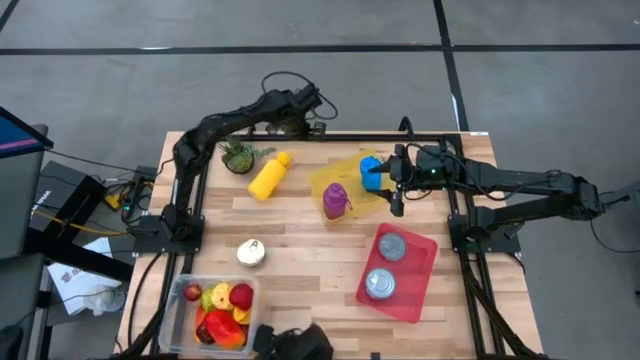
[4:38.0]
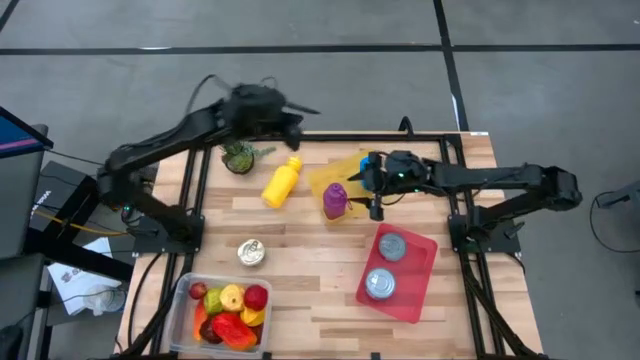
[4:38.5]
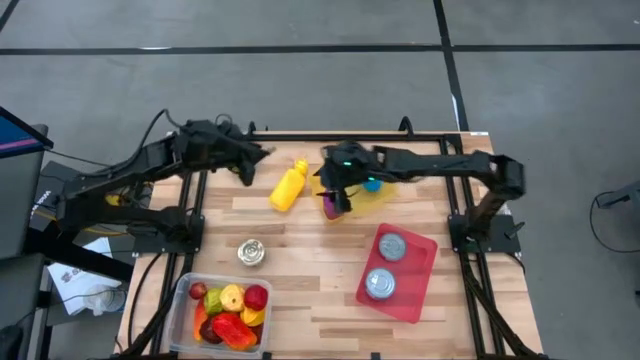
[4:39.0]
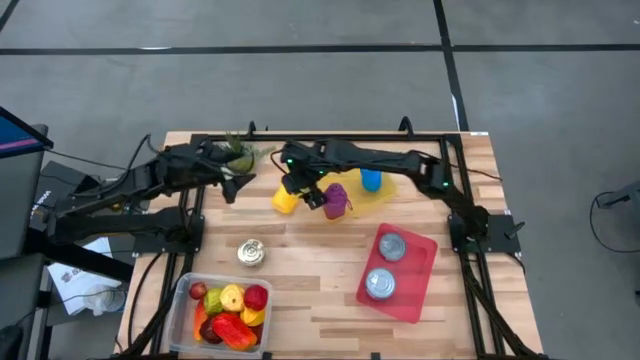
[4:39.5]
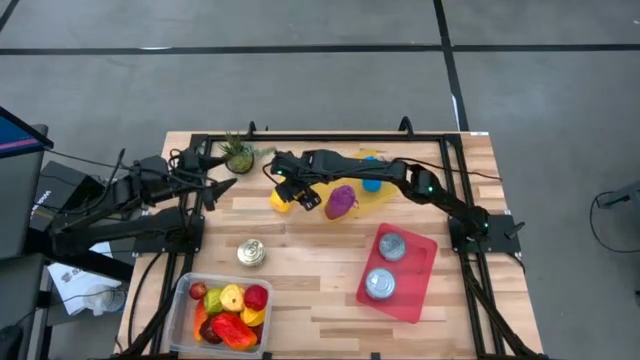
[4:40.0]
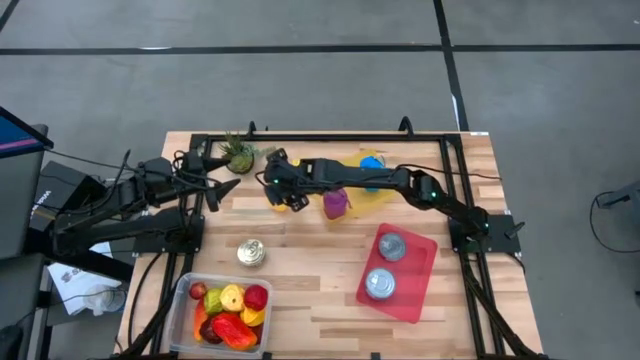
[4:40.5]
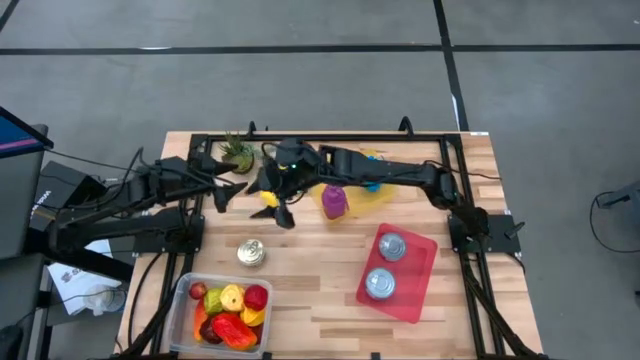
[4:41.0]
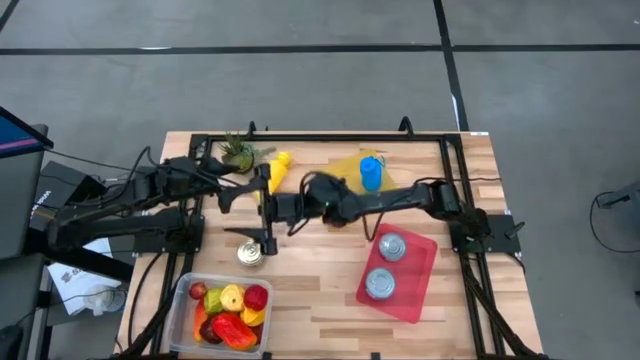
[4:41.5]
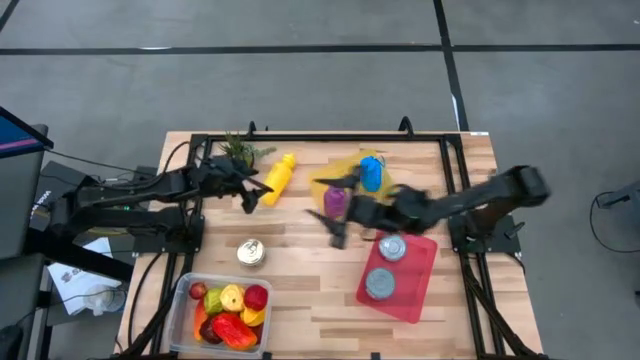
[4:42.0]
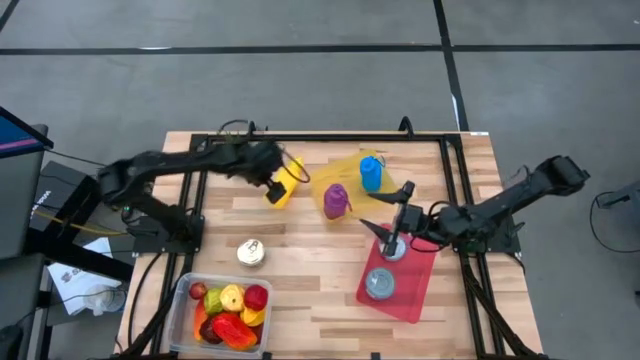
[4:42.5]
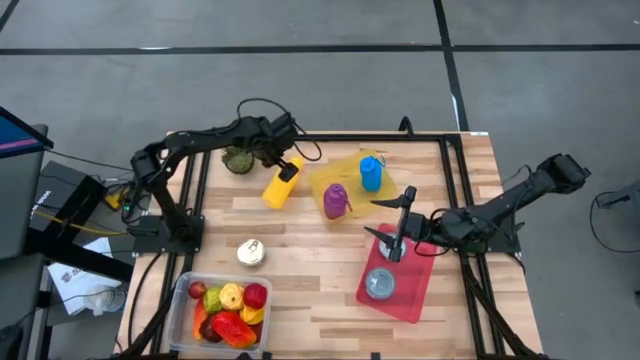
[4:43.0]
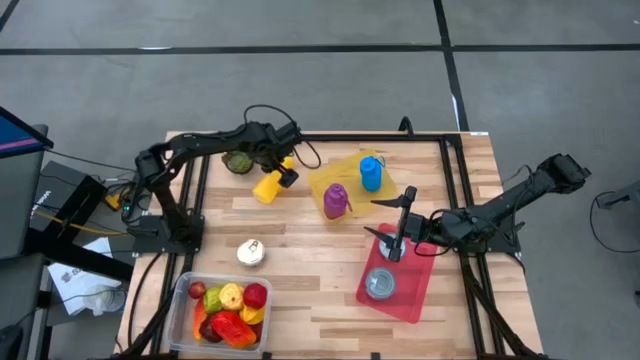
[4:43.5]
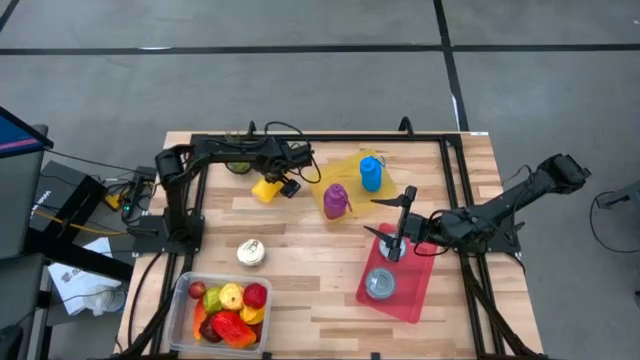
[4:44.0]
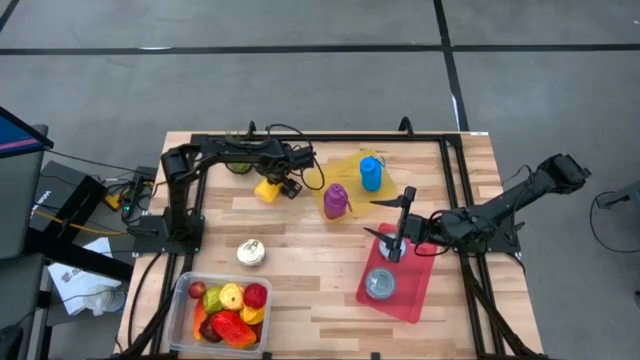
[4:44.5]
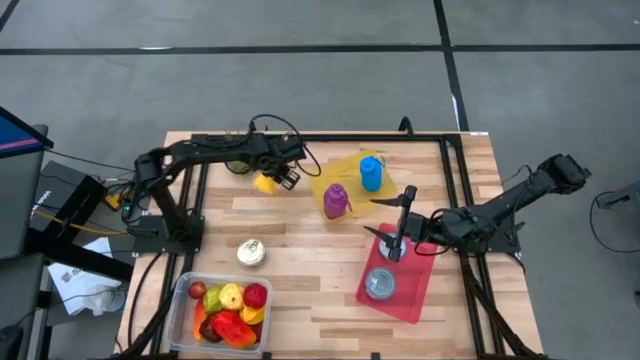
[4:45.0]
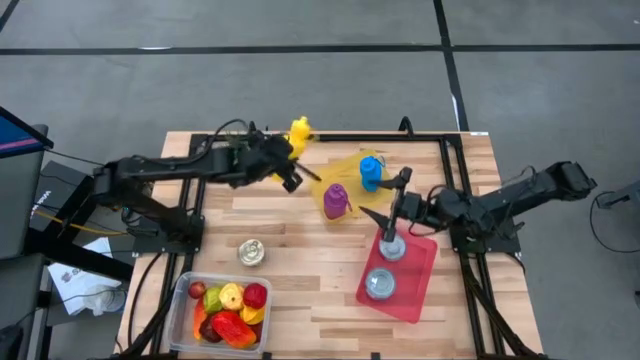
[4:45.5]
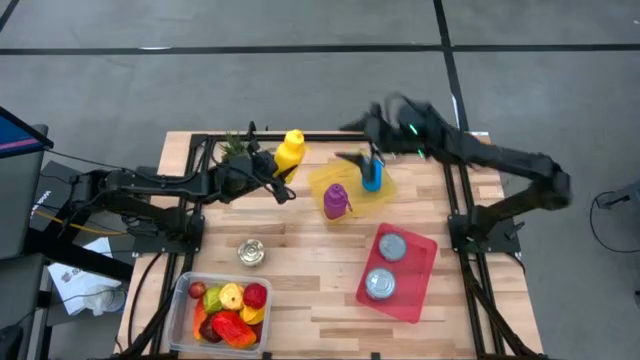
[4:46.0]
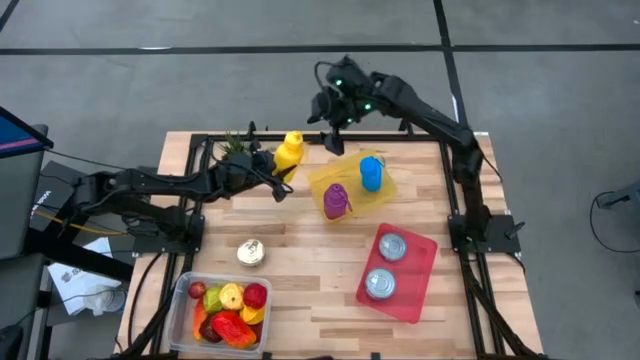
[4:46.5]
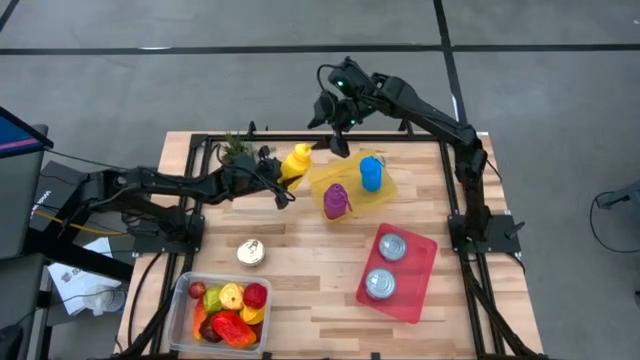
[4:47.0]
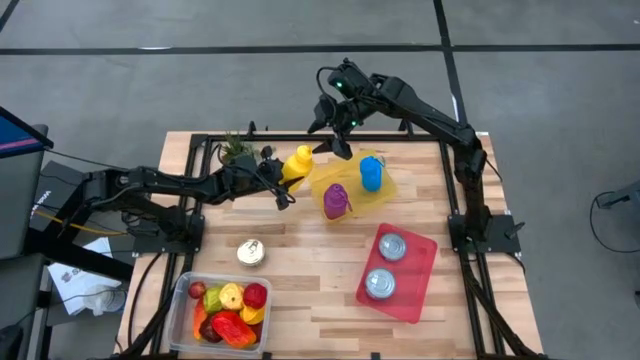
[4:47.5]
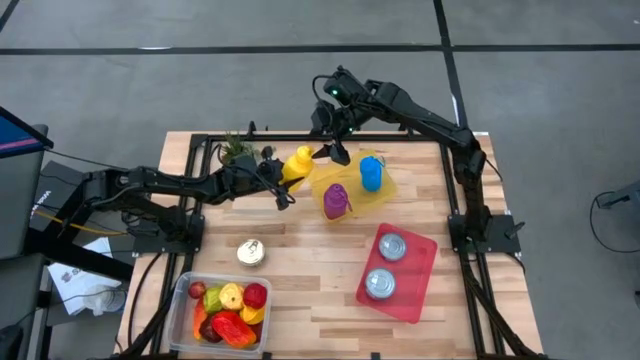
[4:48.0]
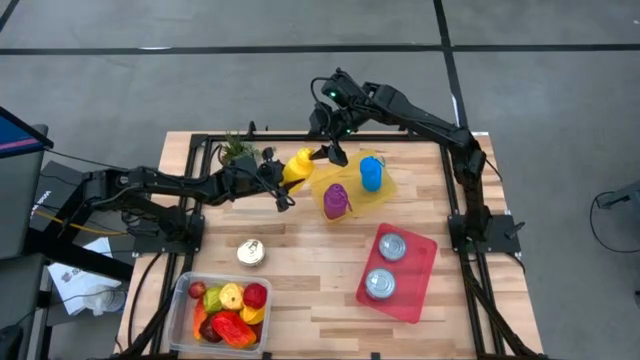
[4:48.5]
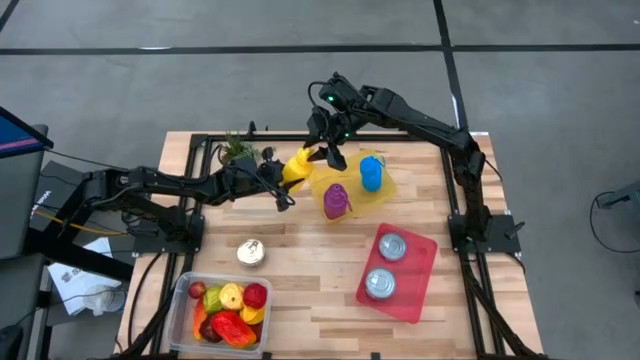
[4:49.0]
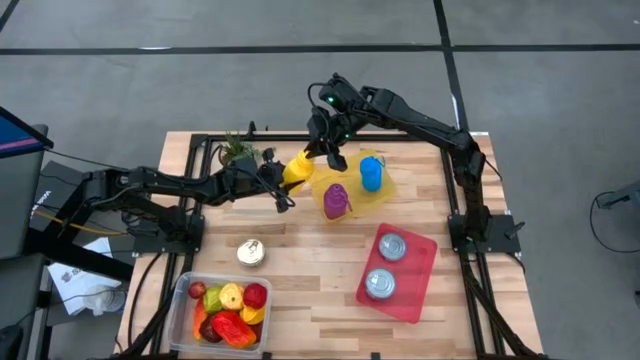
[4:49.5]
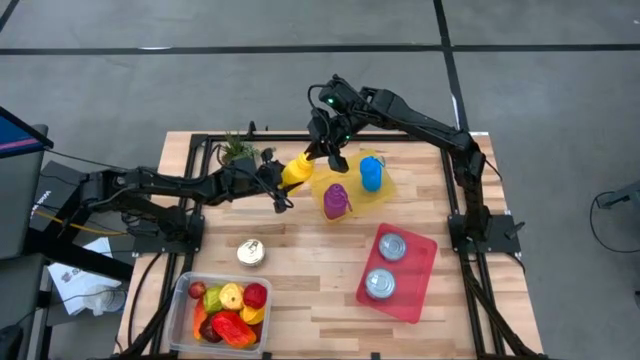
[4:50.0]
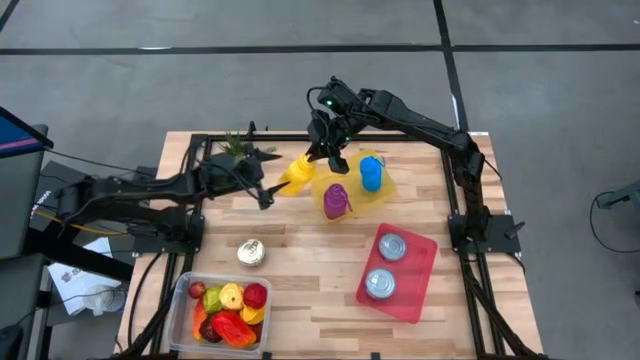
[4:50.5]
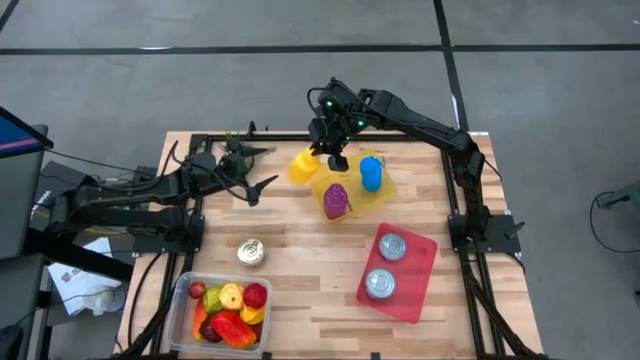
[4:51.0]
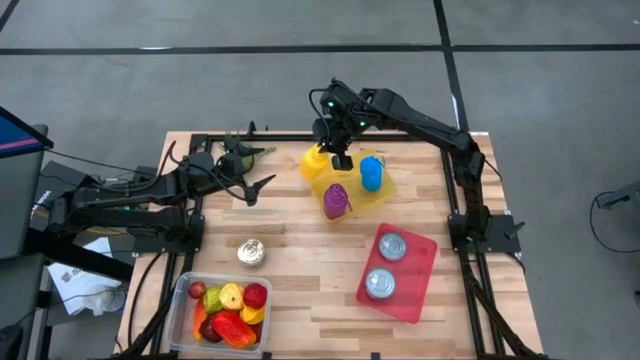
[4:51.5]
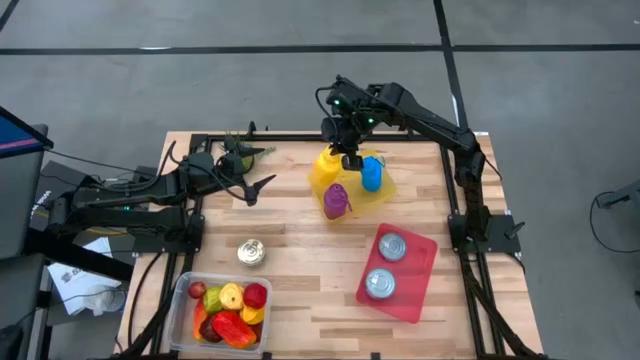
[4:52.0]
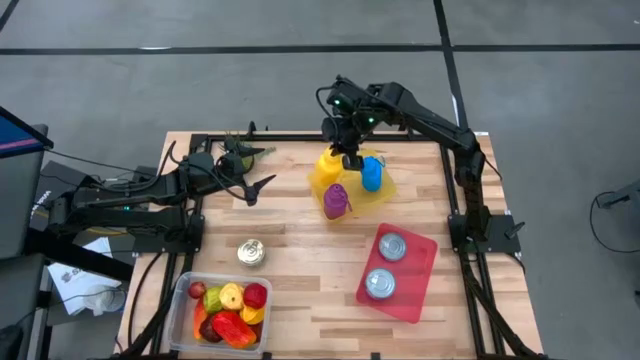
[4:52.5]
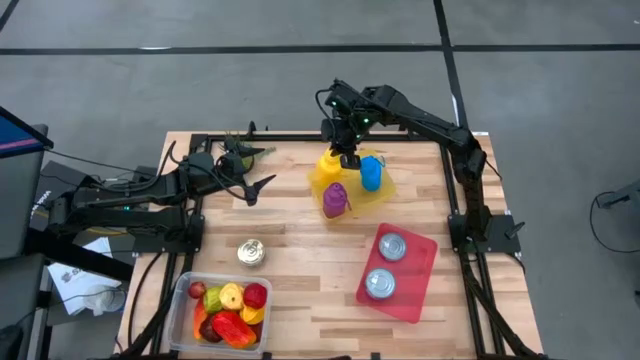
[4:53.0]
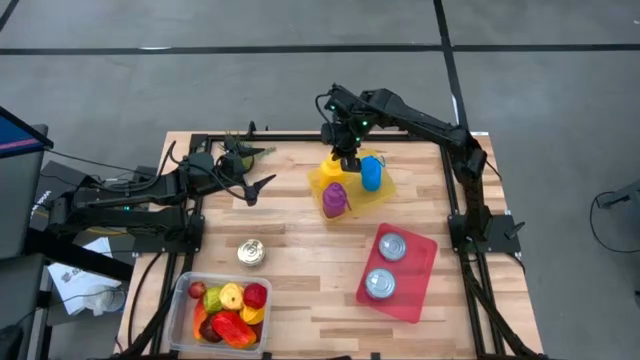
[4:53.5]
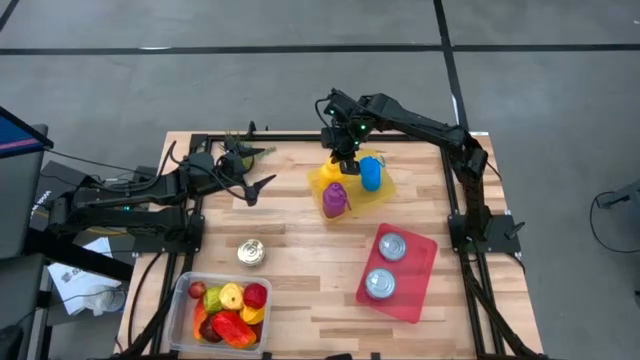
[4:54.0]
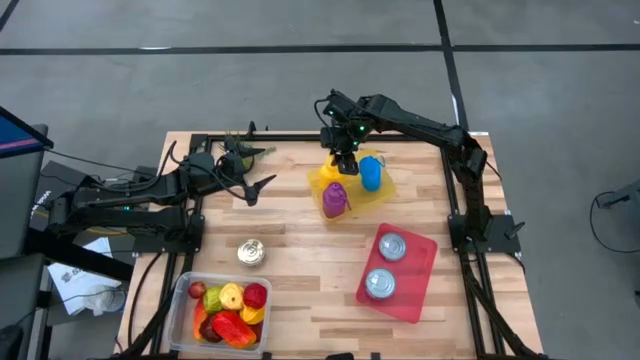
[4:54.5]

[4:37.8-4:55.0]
Task: Pick & Place Food Item
Put the yellow tumbler into the yellow bin

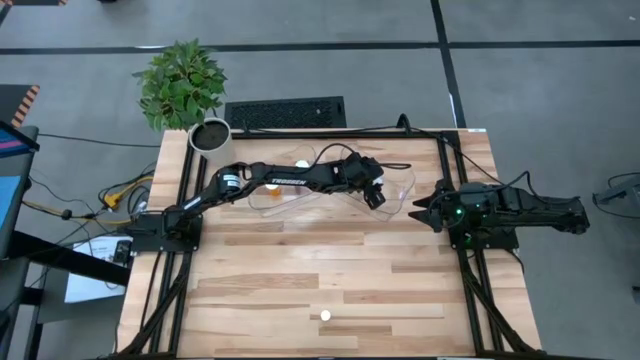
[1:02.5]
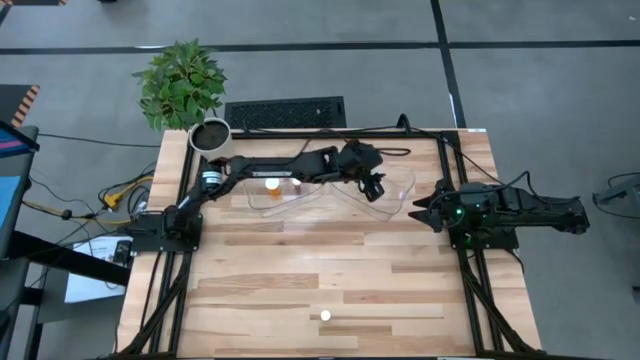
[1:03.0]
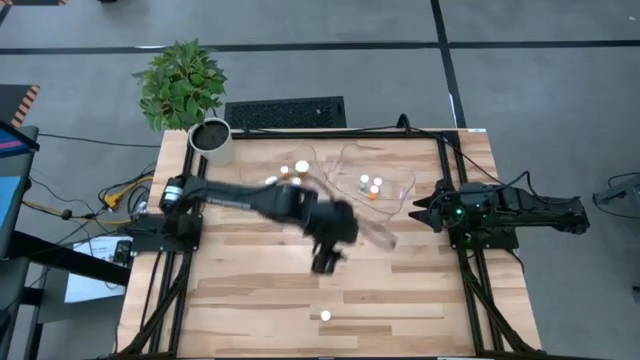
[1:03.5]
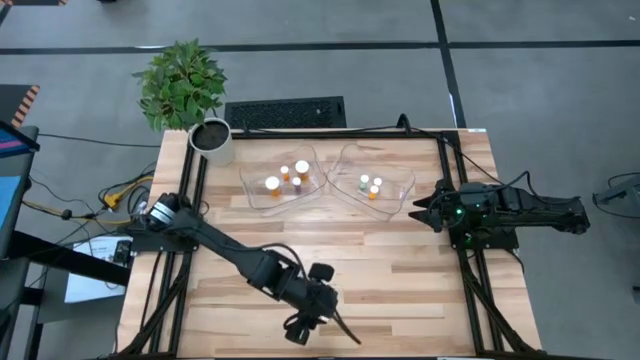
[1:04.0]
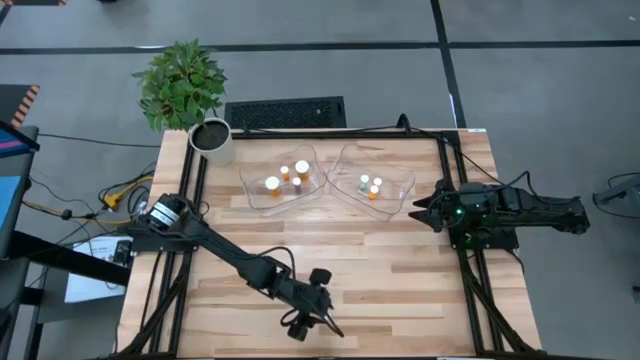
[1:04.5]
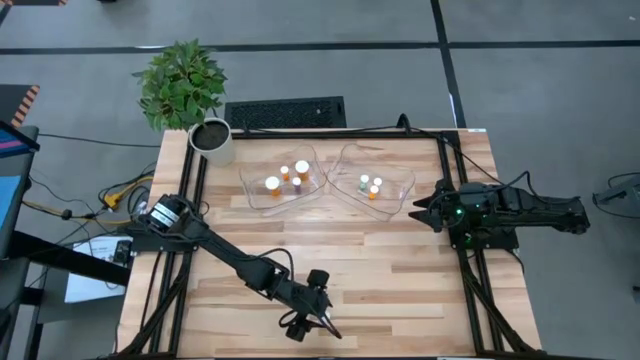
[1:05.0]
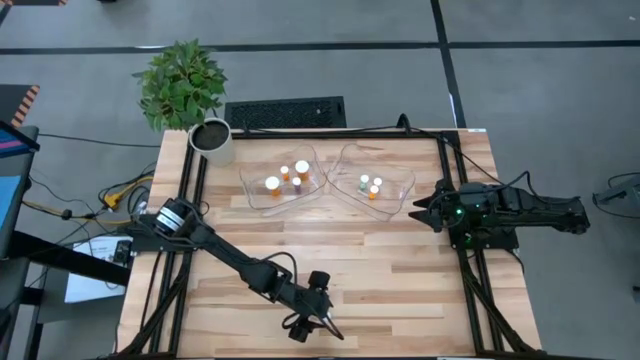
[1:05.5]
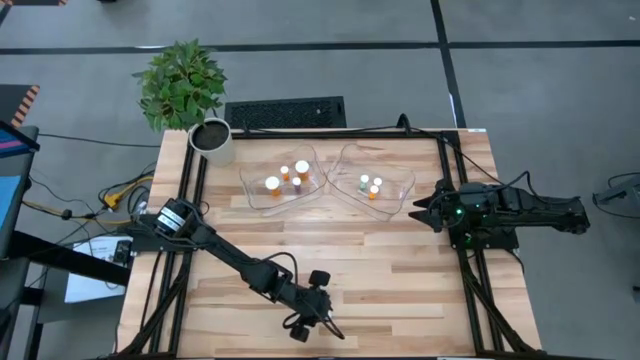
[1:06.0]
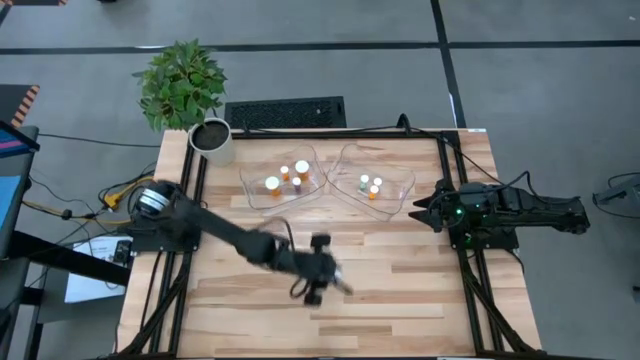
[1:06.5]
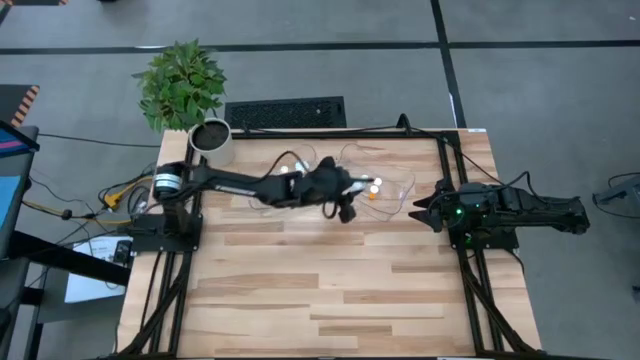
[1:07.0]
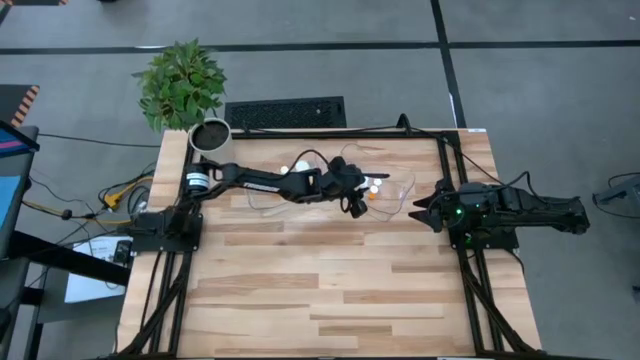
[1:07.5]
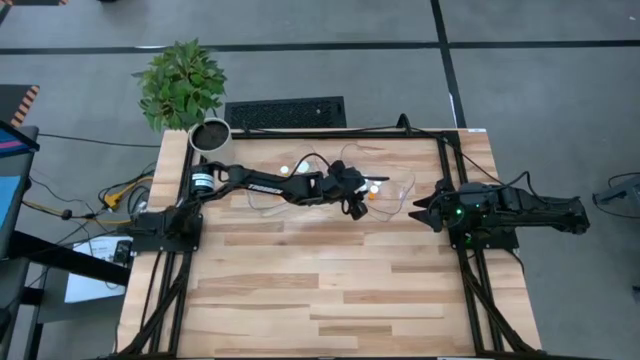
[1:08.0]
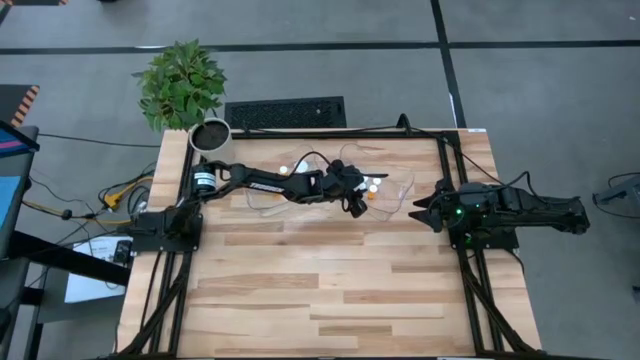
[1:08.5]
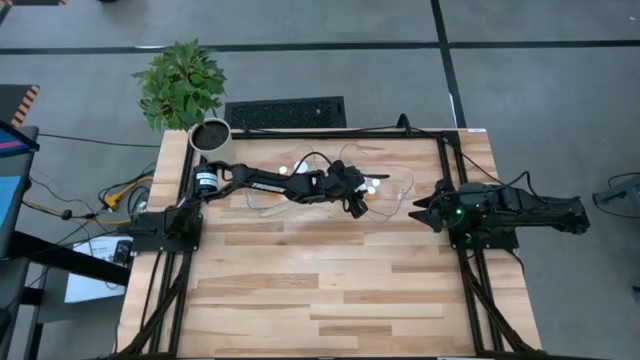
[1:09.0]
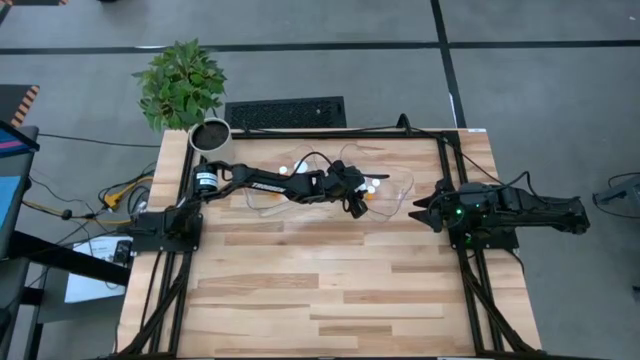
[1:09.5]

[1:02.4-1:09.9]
Task: Pick and place medicine bottles into bin by pill shape (circle, oval)
Put the yellow tablet bottle into the right transparent bin
